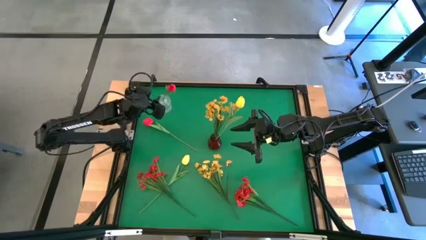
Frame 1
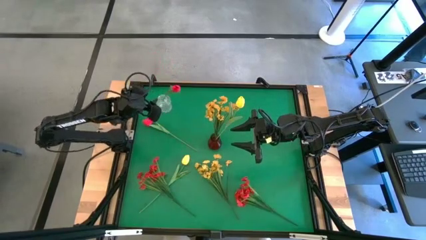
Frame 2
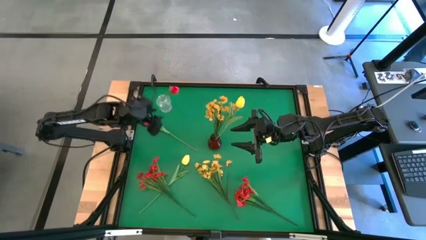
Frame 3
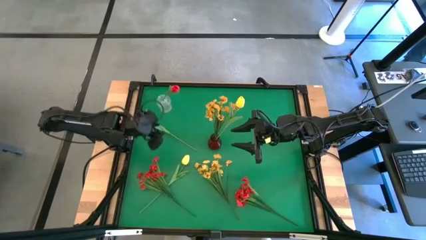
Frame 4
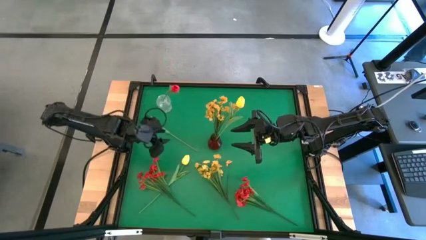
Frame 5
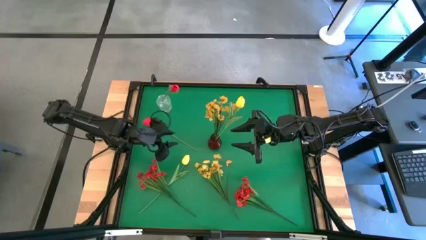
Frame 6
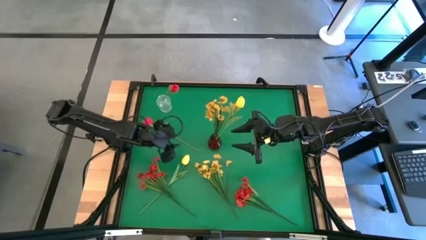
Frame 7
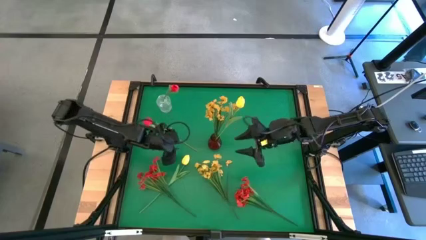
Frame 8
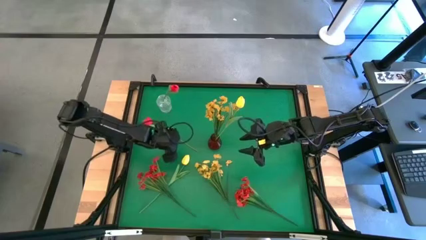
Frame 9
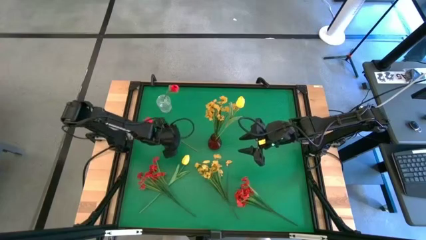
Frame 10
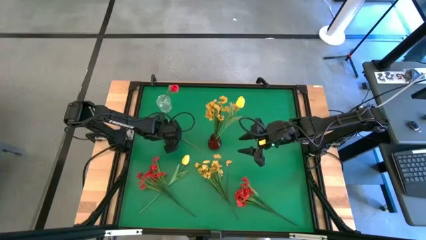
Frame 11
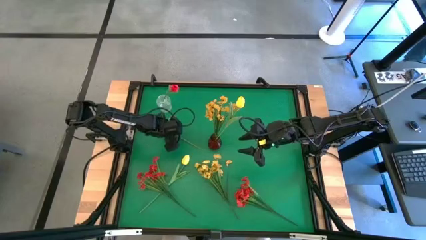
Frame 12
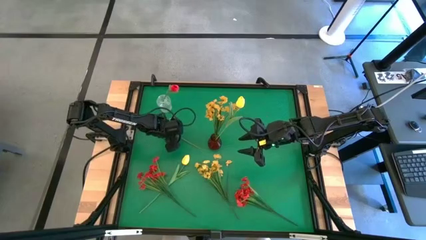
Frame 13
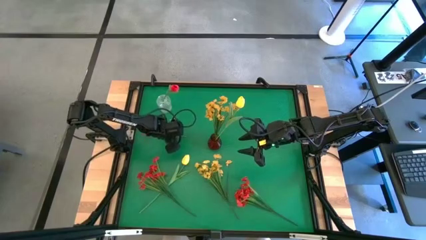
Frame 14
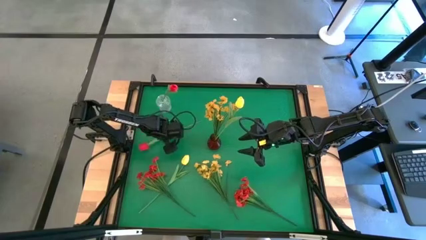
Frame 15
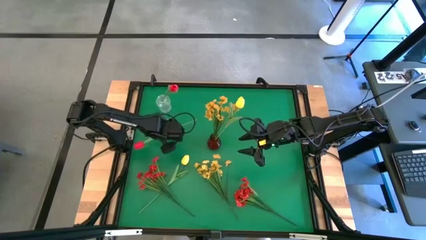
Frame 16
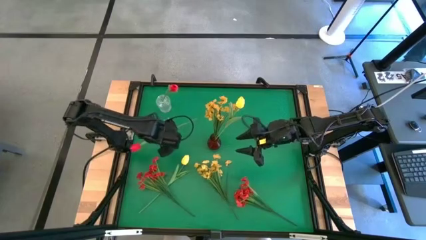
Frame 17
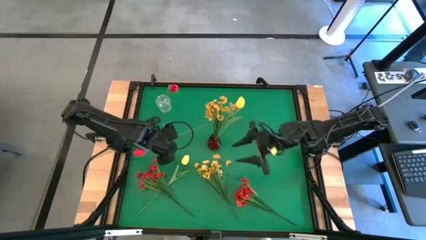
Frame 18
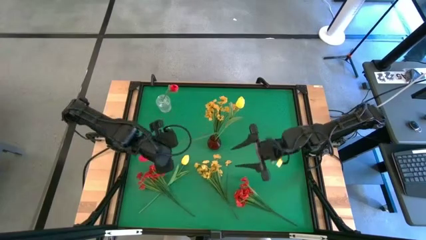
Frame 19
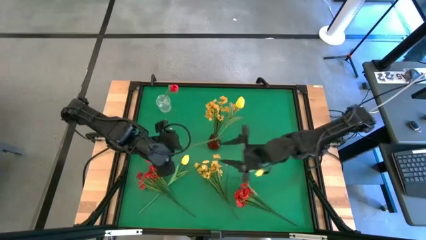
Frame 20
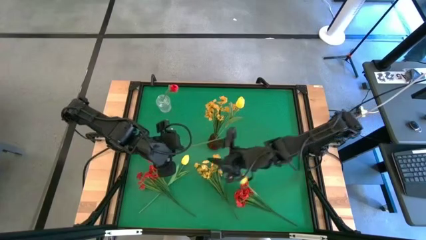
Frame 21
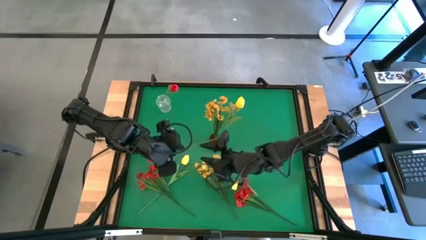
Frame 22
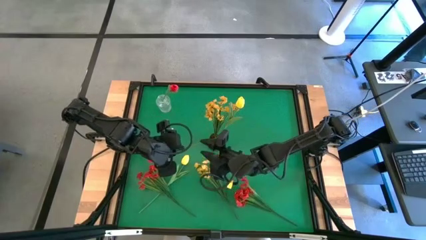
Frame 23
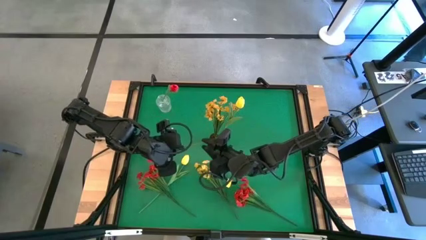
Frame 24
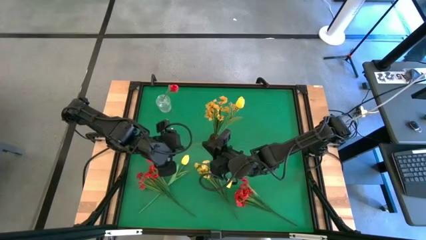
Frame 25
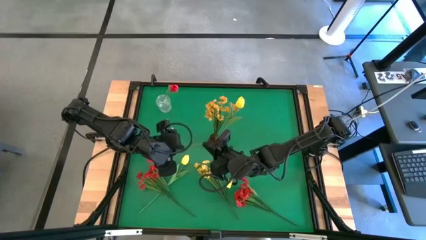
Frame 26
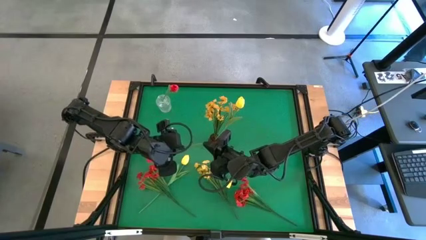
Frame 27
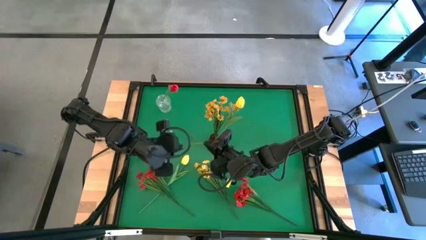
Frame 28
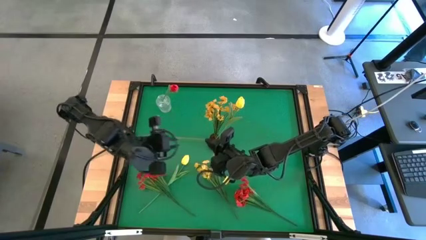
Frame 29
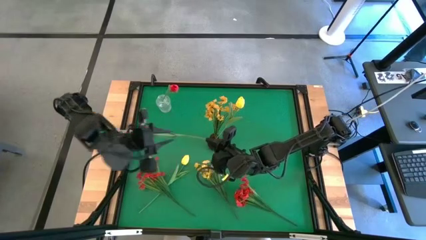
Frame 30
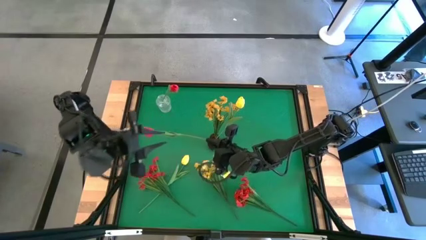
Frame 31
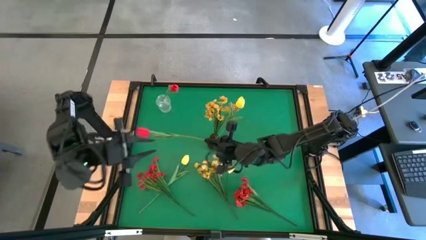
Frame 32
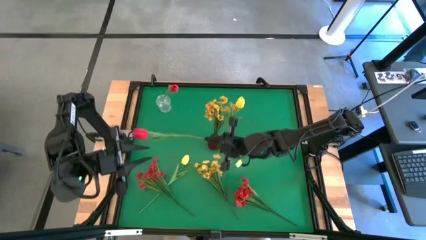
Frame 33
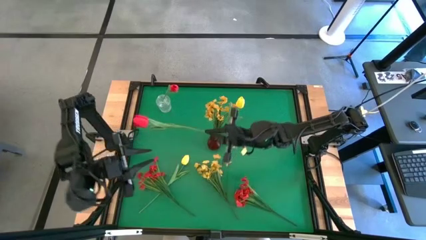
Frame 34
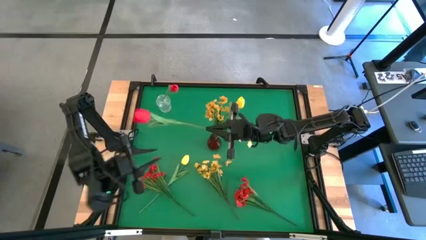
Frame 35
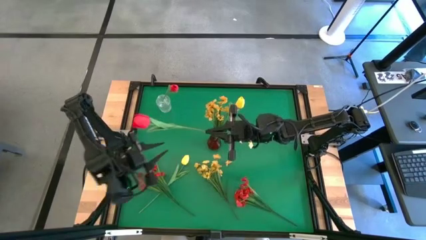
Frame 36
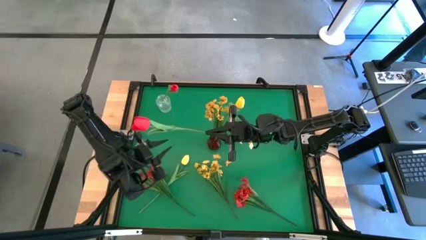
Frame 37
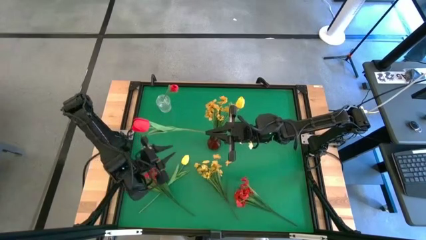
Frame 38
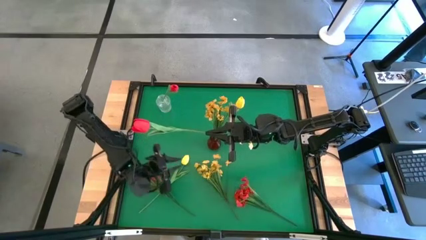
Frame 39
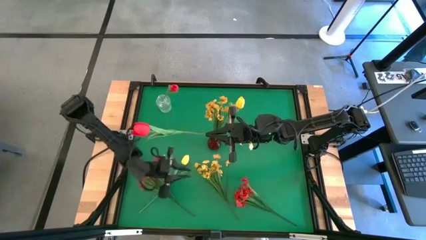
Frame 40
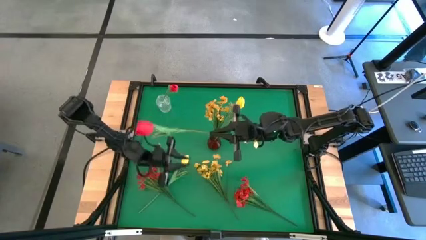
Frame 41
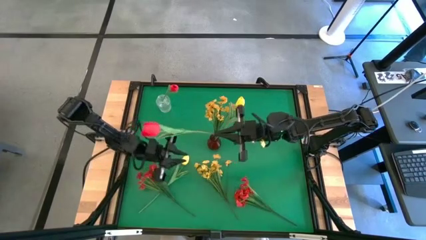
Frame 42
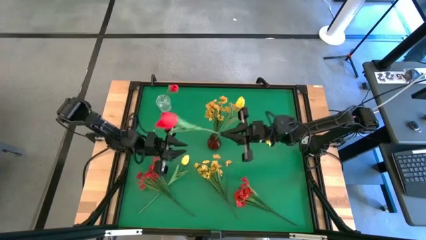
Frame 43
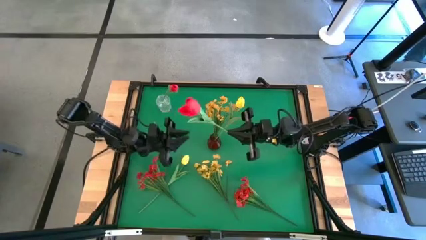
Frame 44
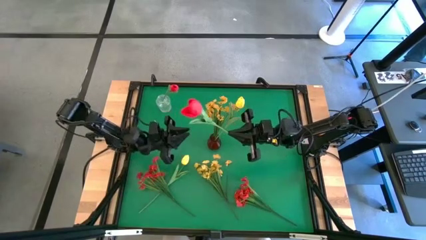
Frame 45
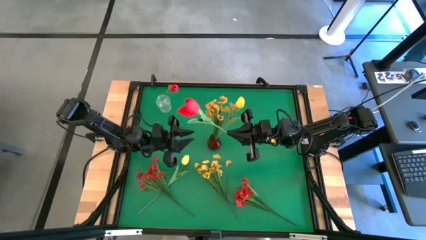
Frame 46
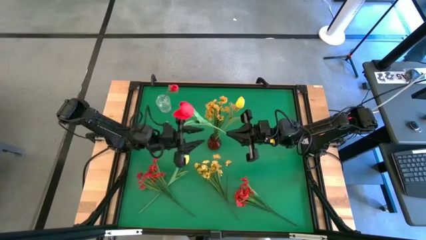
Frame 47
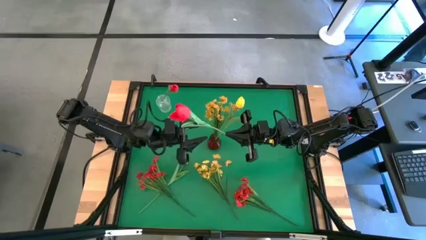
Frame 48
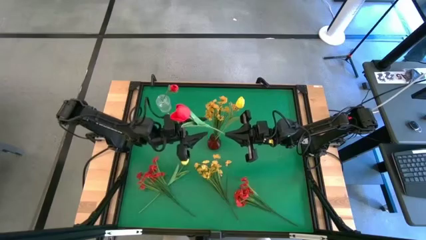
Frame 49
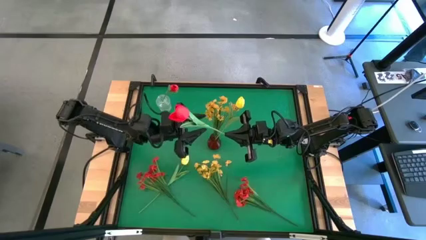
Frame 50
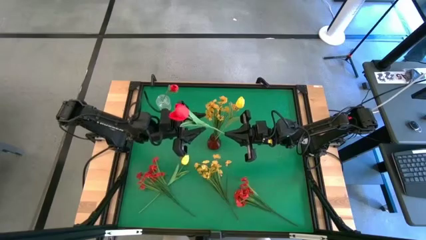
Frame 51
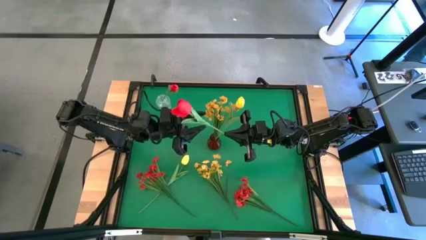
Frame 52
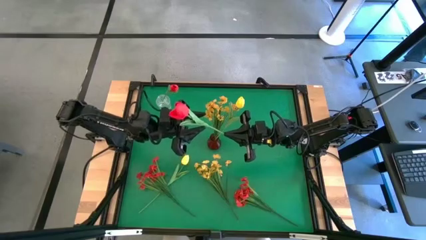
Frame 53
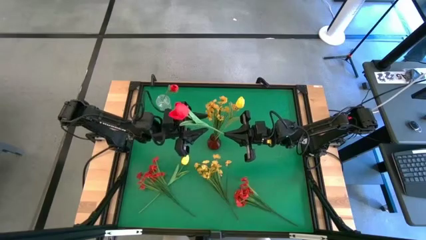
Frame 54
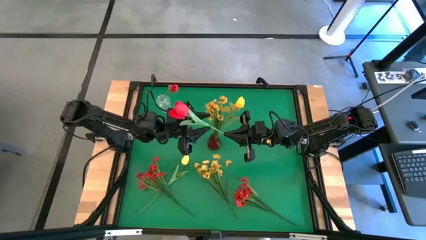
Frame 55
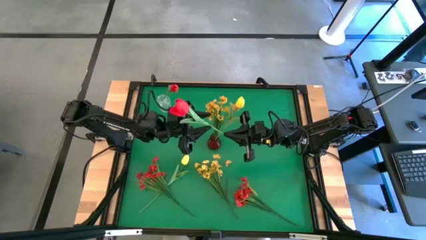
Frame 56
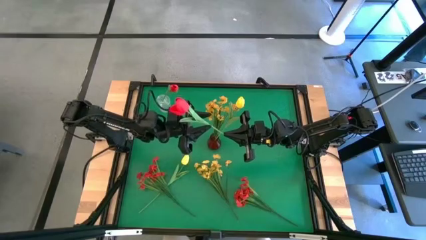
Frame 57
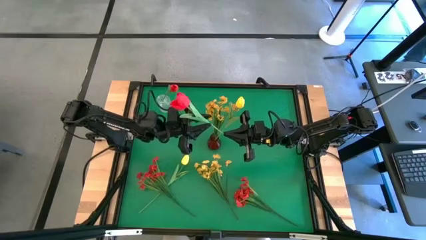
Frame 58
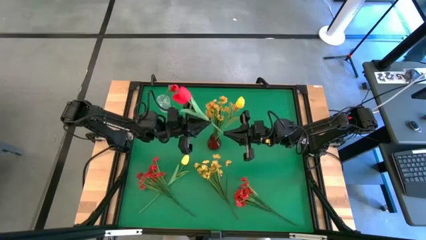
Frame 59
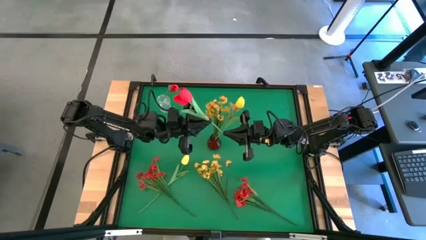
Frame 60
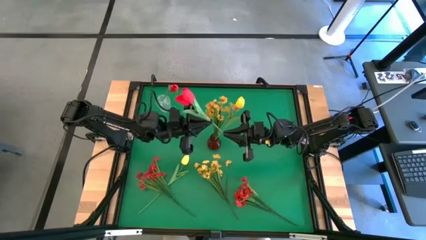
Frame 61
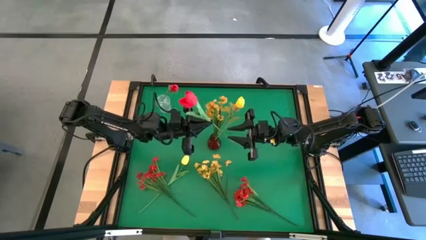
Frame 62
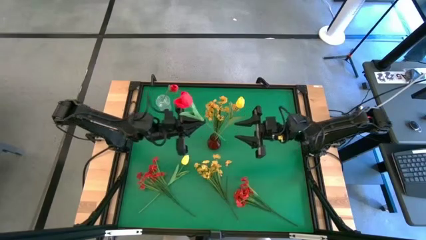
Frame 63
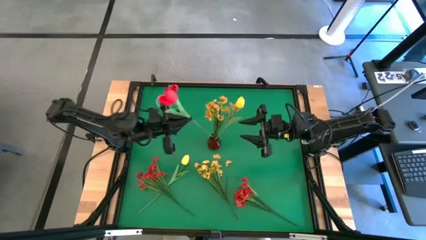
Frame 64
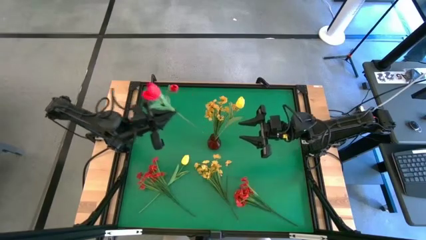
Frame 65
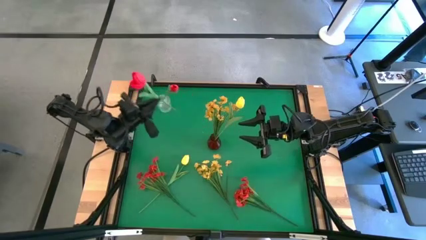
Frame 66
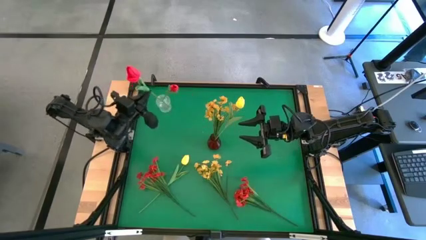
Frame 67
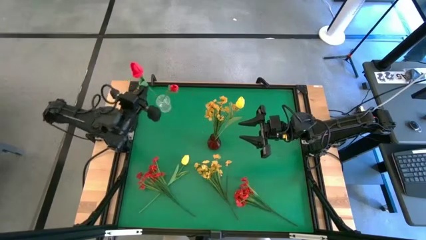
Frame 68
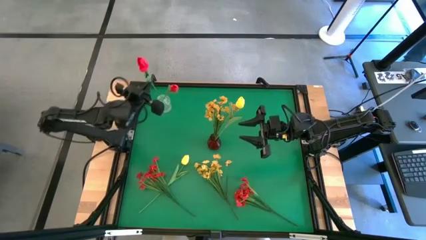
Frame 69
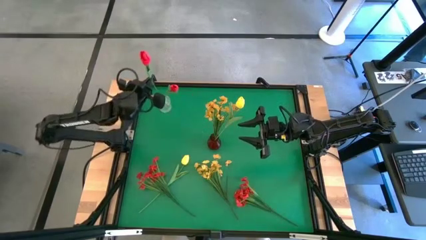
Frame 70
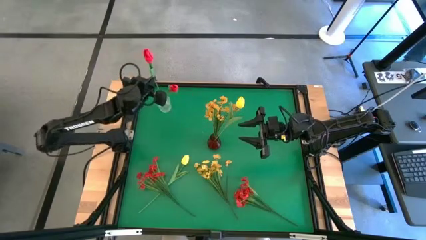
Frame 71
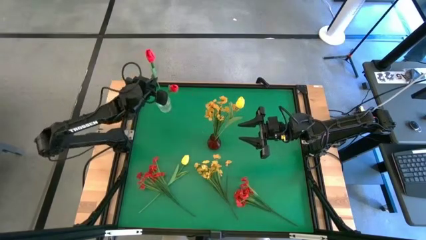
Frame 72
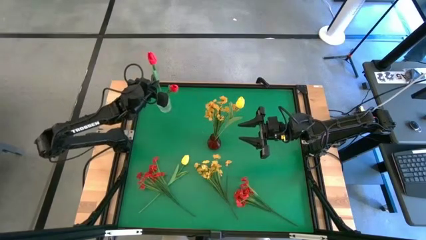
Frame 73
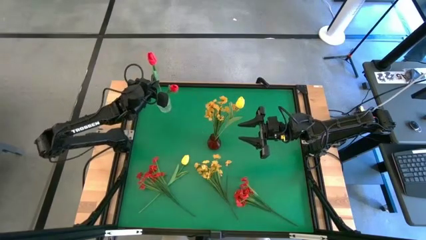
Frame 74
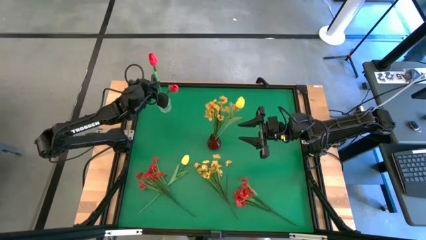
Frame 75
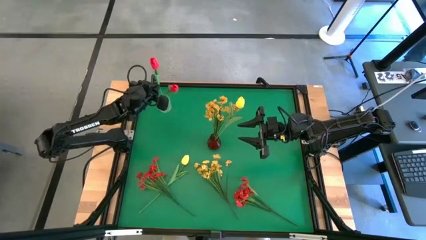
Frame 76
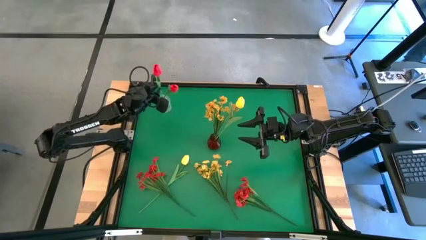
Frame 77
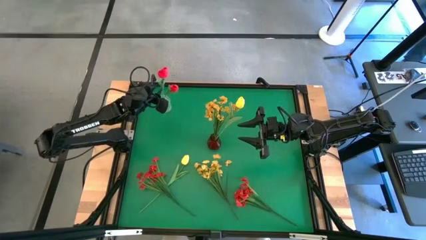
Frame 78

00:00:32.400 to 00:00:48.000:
Task: Sort flowers into vase by color
Put the red flower into the transparent vase
